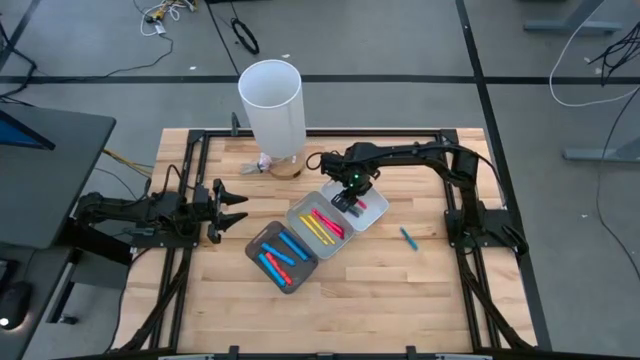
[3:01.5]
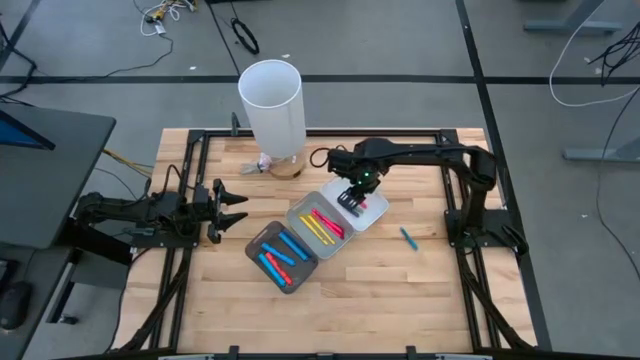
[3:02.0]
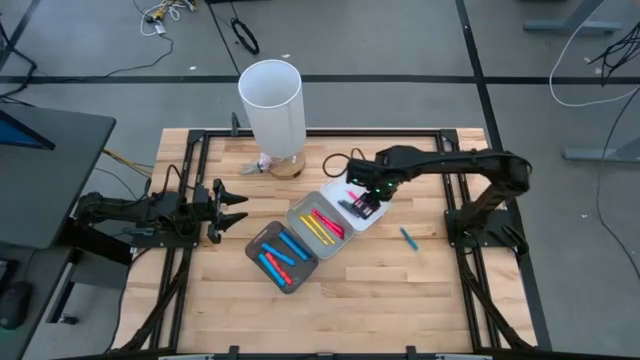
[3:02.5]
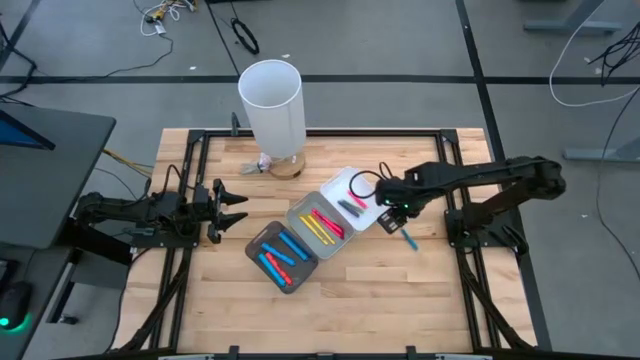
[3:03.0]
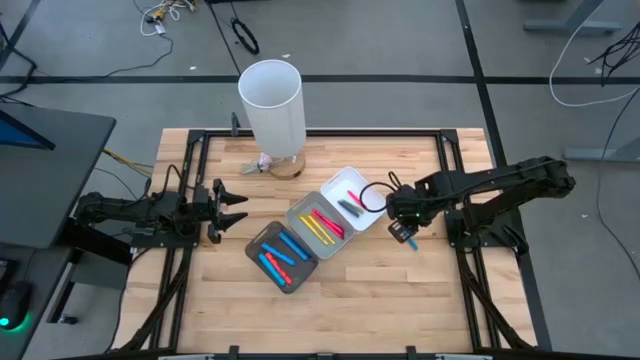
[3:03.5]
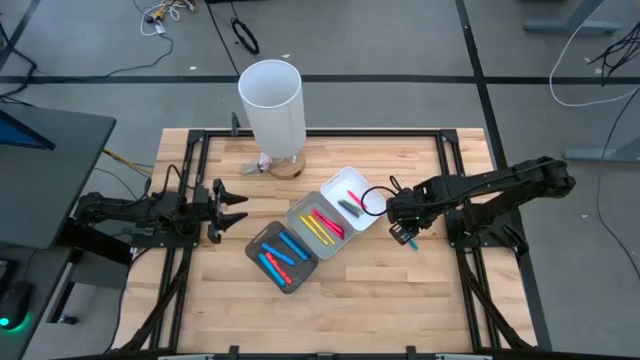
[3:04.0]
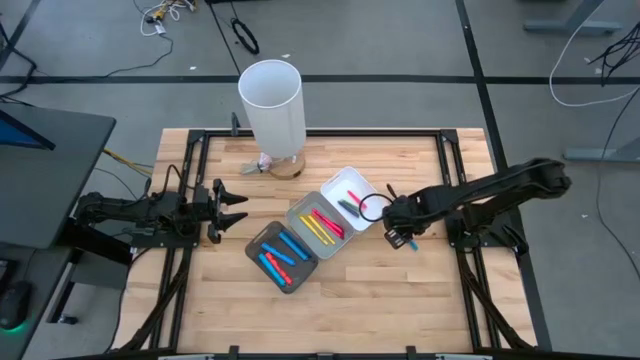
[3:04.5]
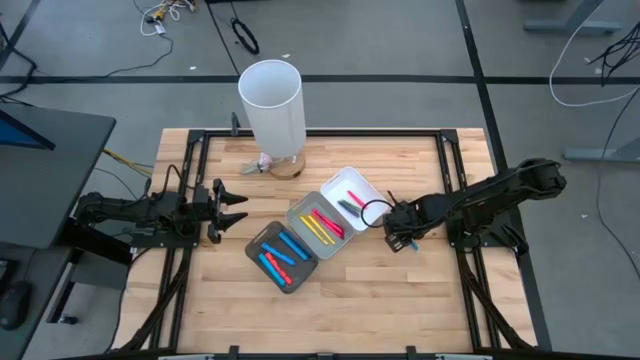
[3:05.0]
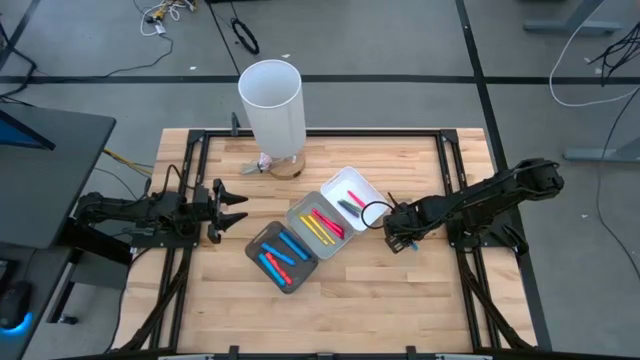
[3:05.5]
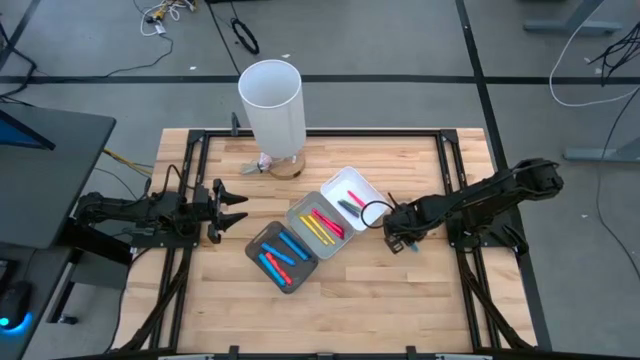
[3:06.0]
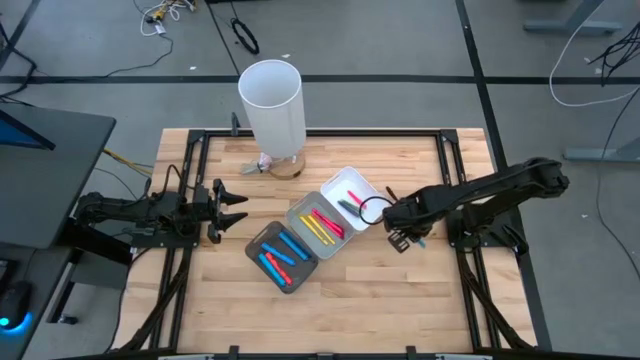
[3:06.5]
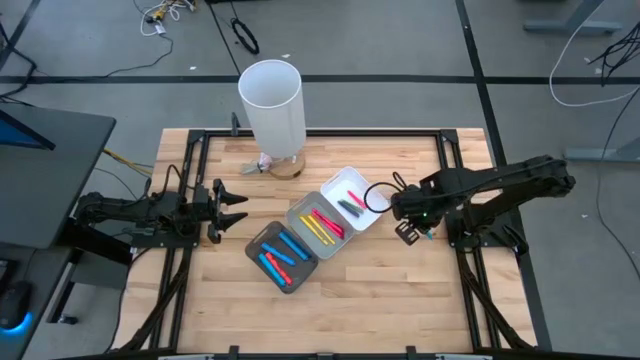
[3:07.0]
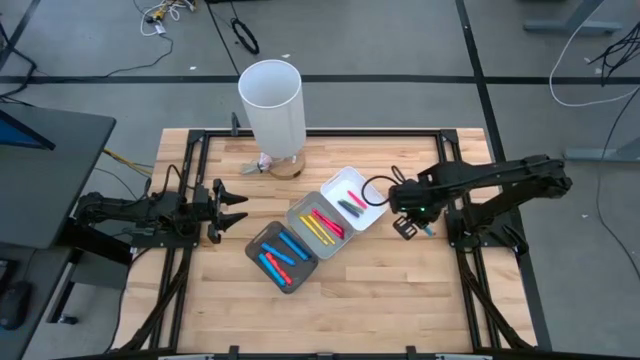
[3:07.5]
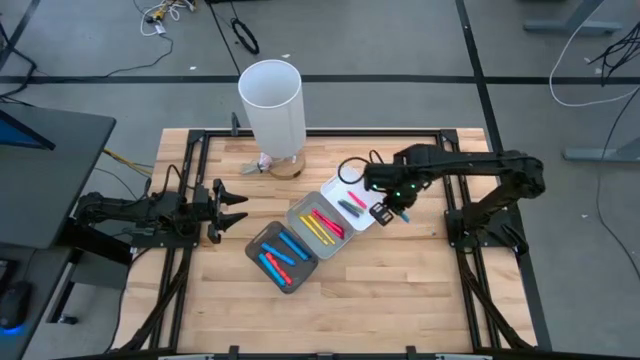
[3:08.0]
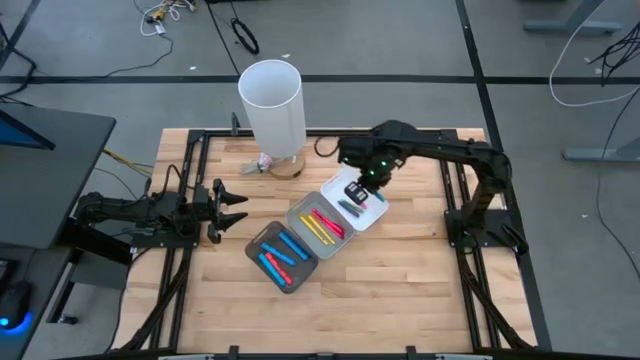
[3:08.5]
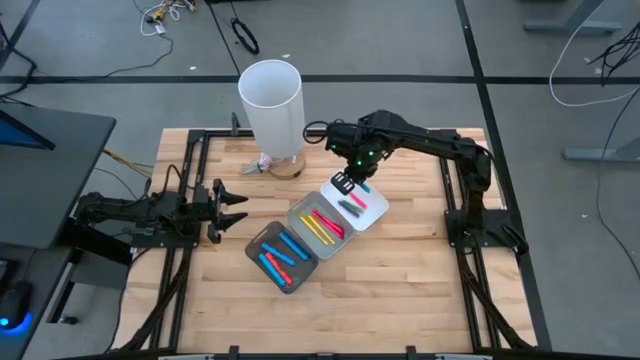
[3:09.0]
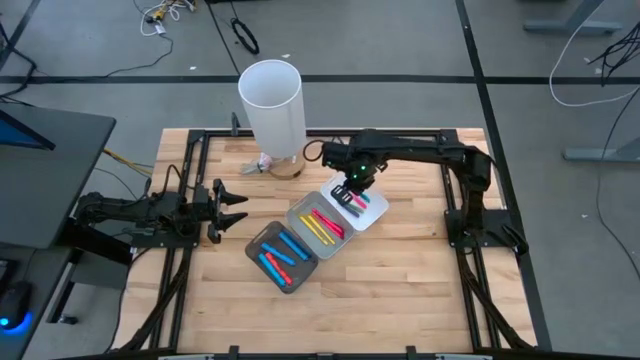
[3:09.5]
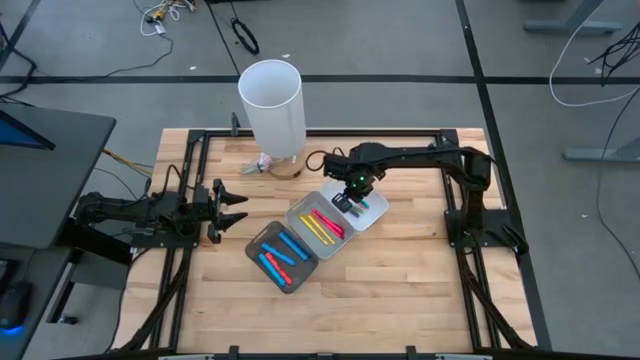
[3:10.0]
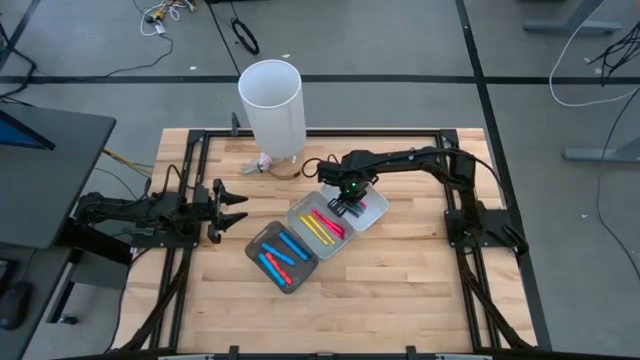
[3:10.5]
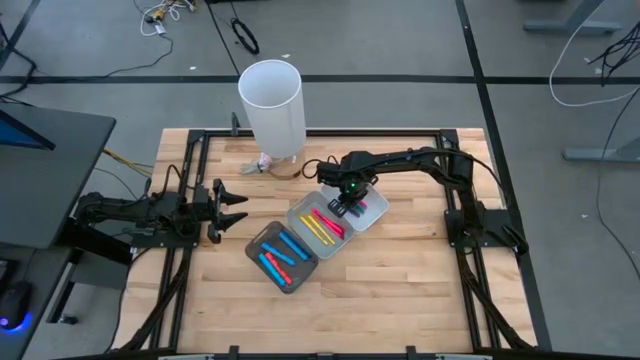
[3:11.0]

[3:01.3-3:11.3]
Task: Pick & Place Markers
Put the blue pen into the white bin

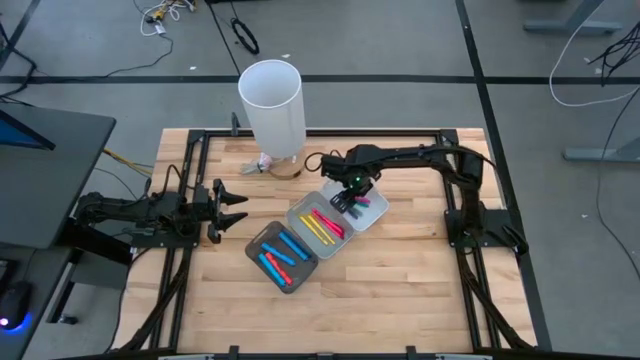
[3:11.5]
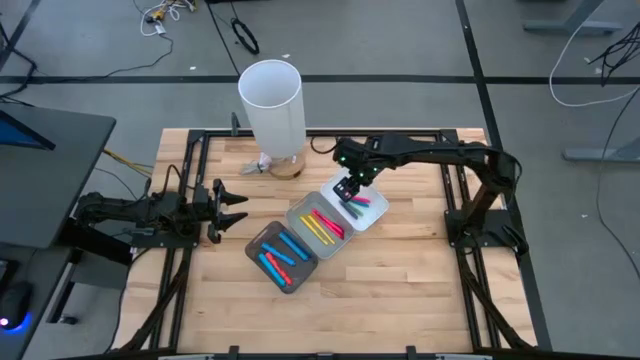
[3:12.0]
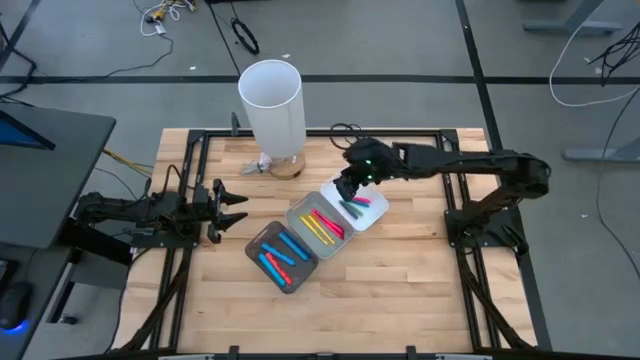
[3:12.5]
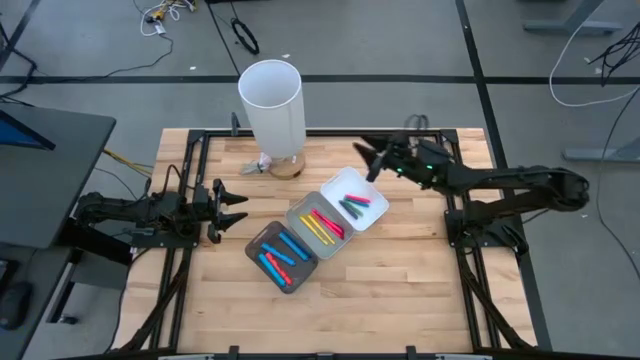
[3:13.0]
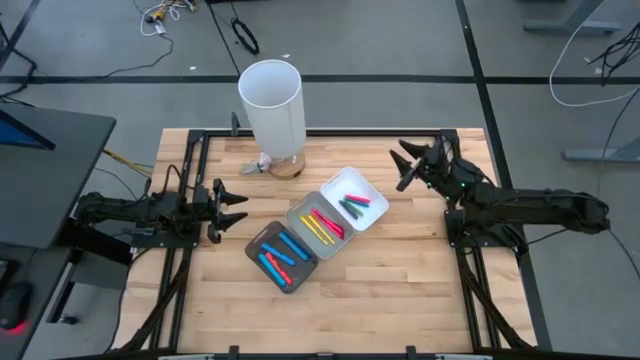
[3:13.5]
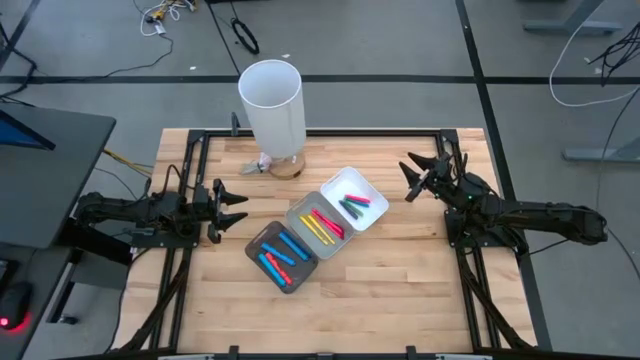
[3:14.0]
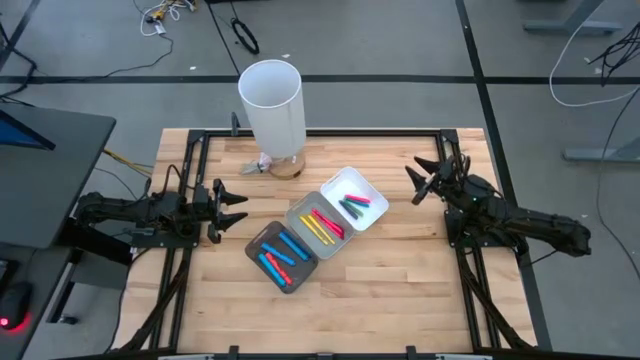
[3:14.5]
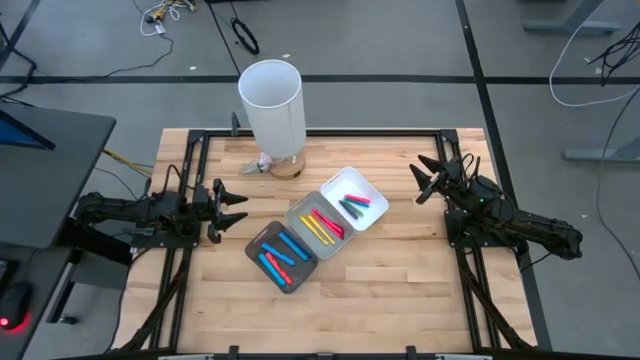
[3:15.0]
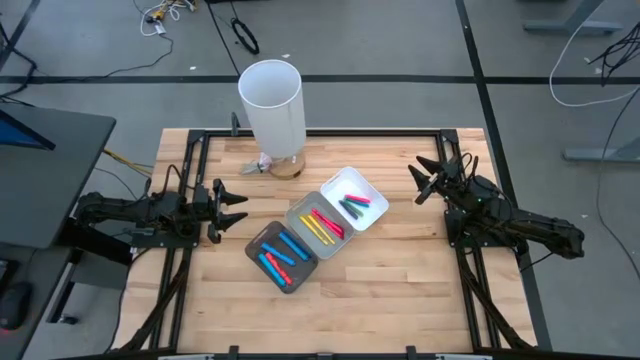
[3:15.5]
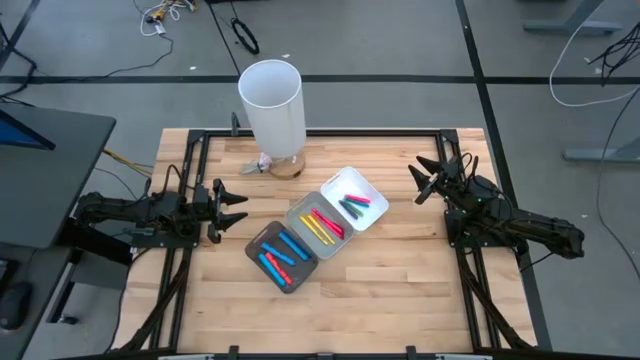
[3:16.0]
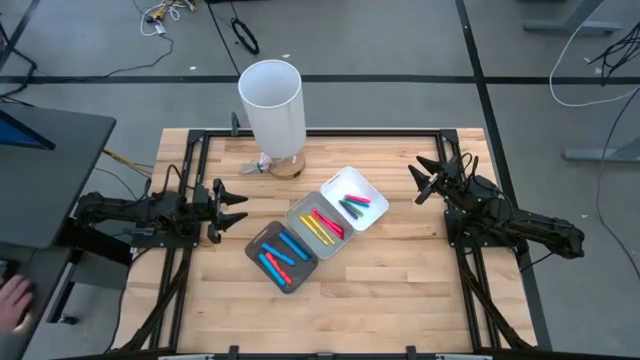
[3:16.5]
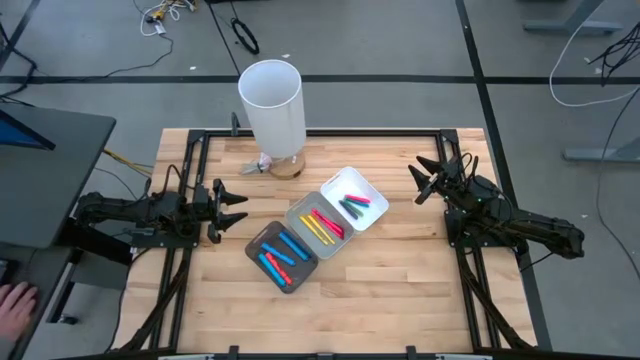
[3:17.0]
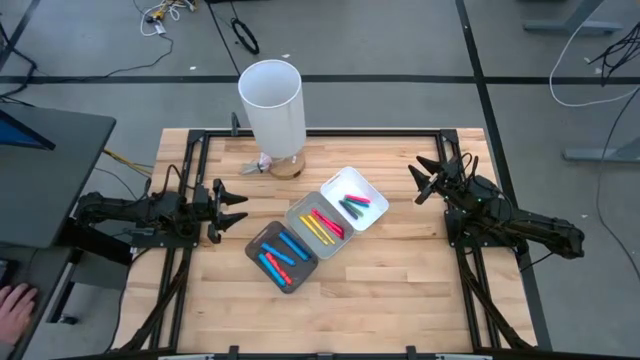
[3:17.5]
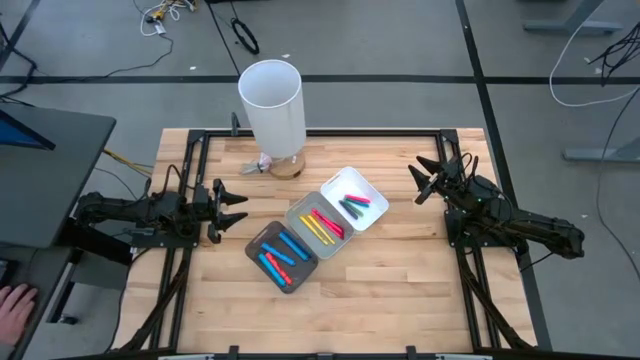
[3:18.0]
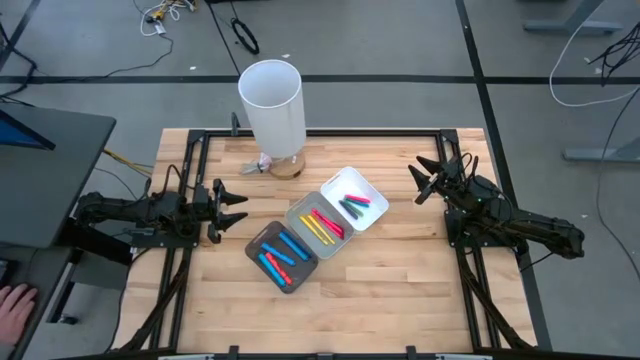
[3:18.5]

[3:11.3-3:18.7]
Return to home position

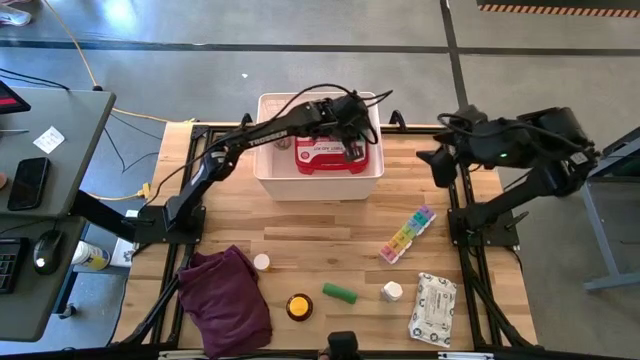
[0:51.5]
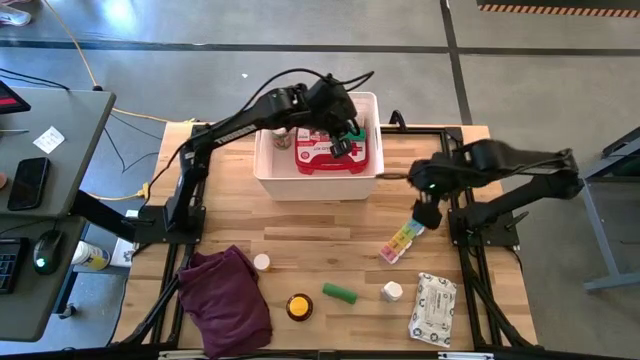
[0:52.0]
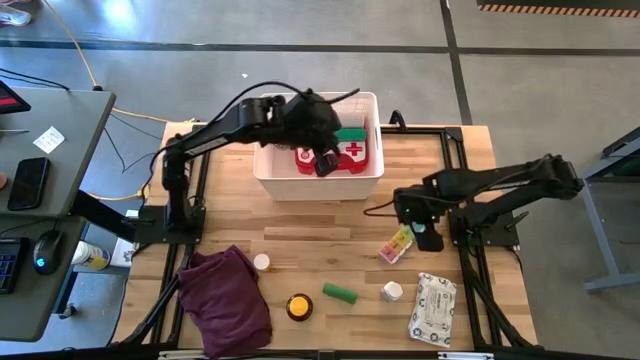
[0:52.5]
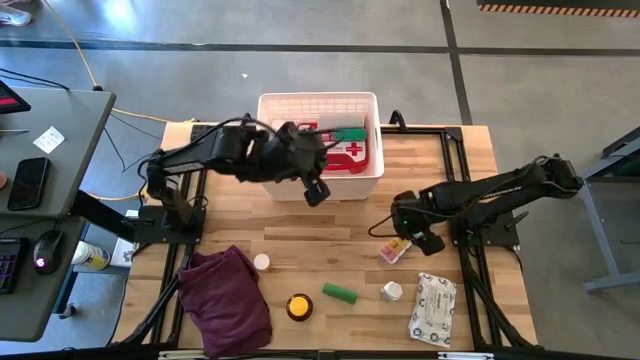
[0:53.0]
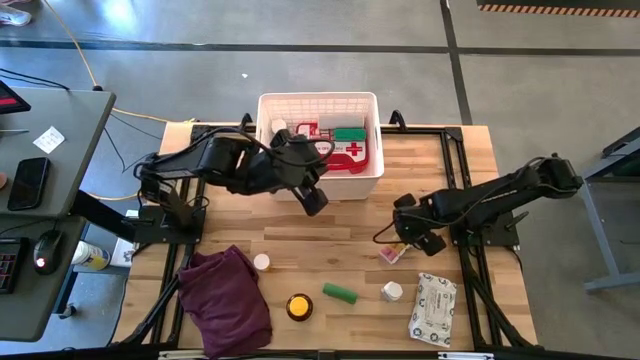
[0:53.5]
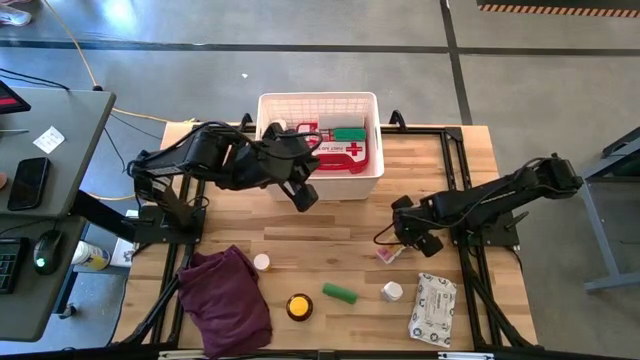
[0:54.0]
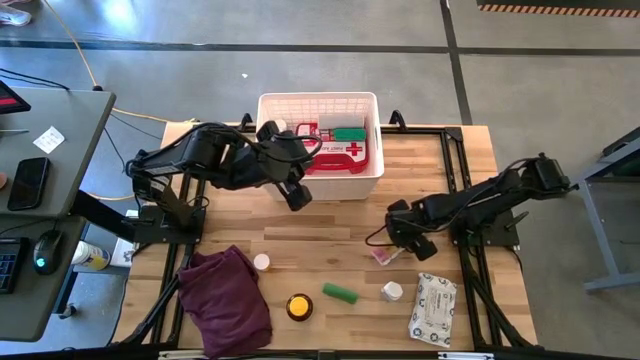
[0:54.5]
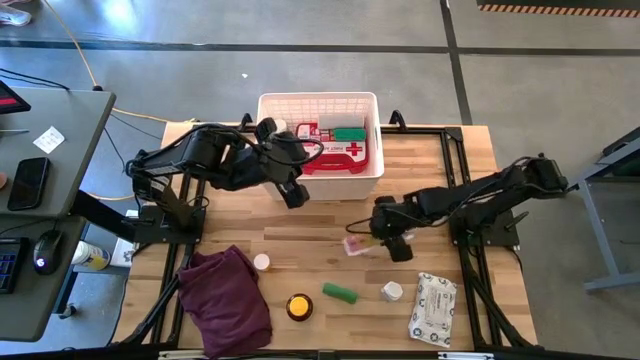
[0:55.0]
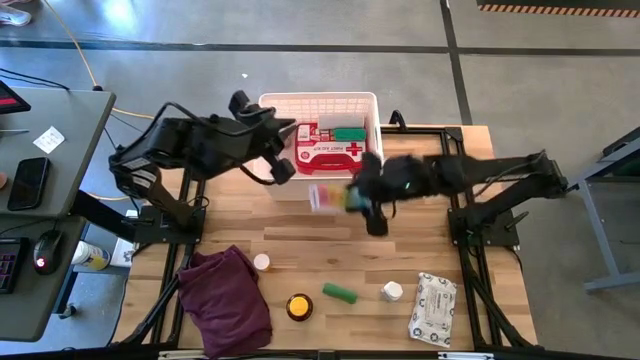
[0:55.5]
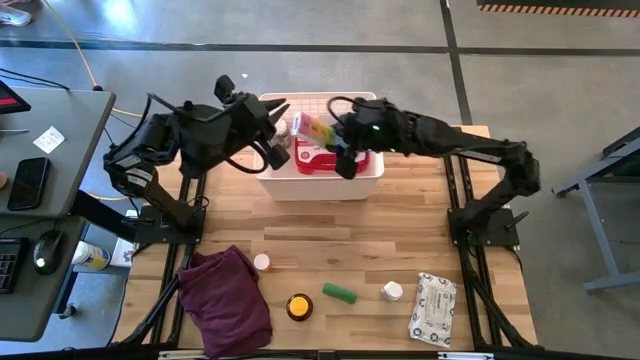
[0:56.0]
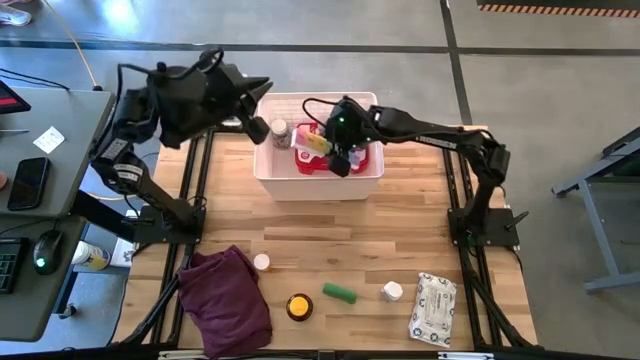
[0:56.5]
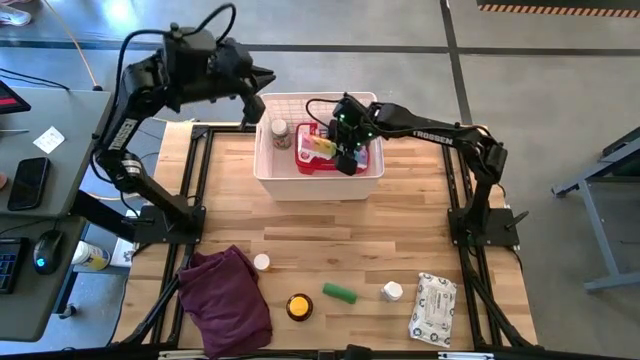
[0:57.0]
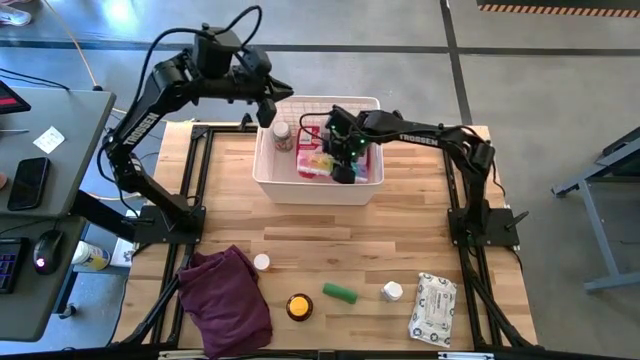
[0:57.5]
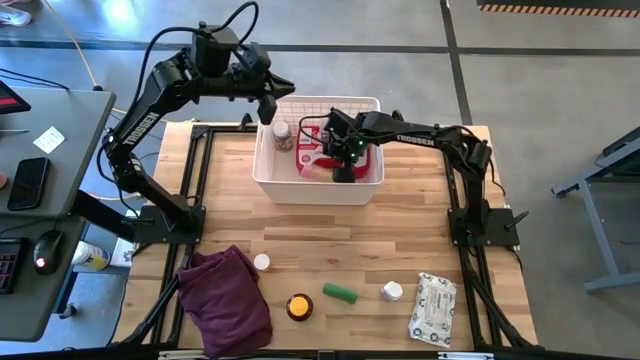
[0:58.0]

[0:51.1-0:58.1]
Task: Pick & place medical supplies in basket/bin
Put the medicine organizer into the white bin
